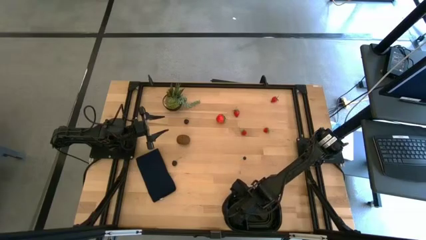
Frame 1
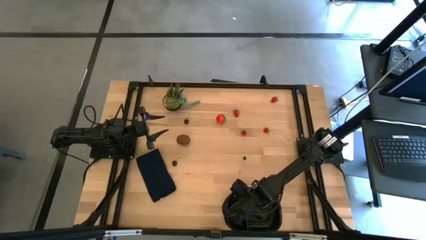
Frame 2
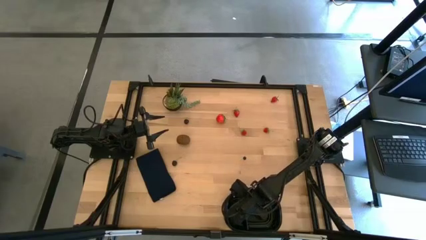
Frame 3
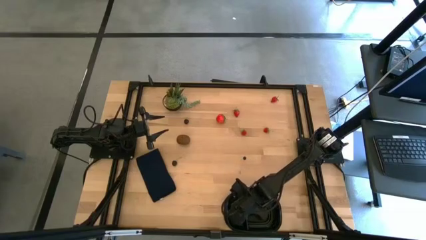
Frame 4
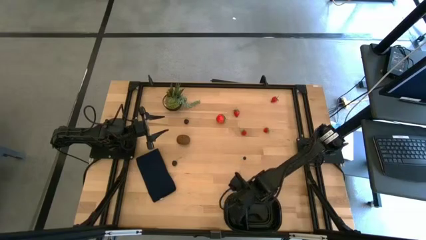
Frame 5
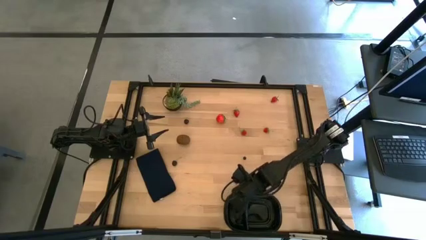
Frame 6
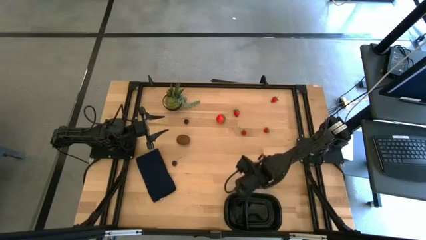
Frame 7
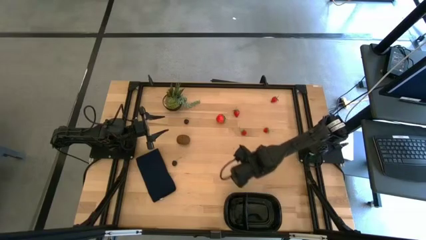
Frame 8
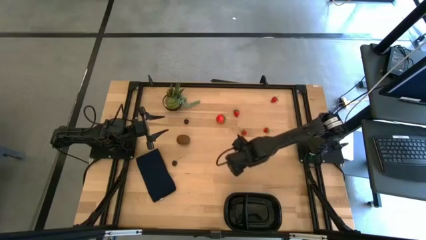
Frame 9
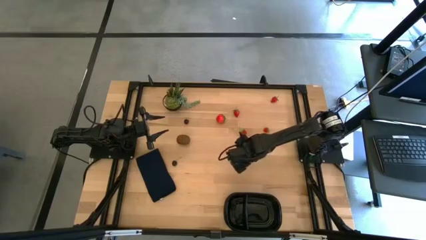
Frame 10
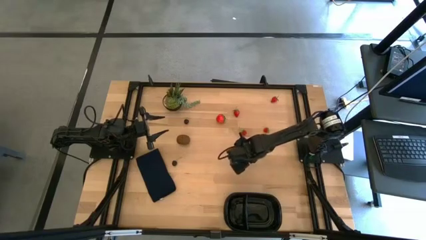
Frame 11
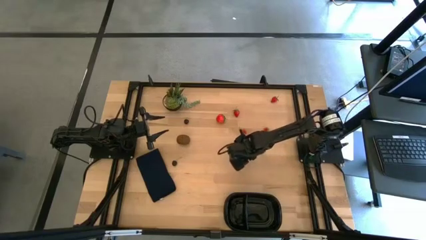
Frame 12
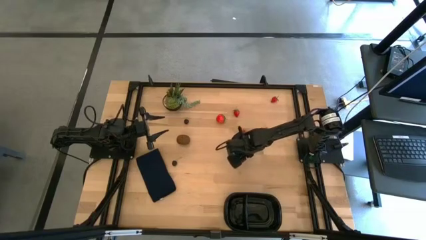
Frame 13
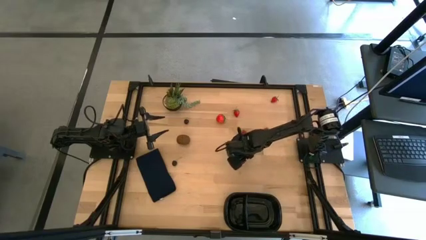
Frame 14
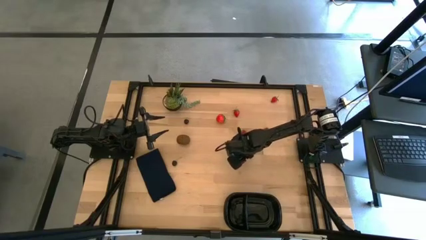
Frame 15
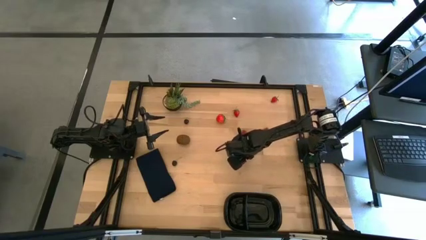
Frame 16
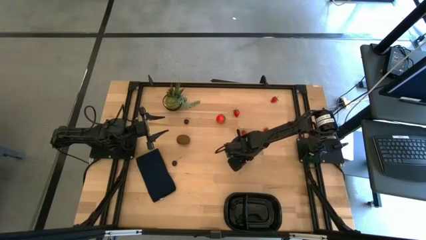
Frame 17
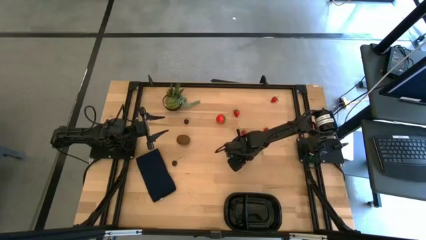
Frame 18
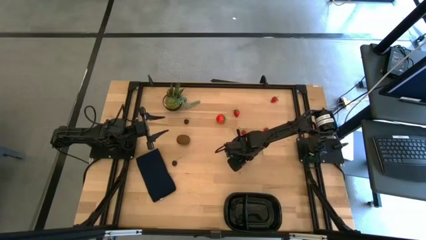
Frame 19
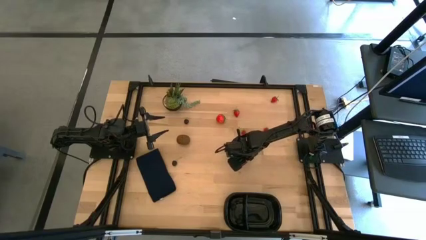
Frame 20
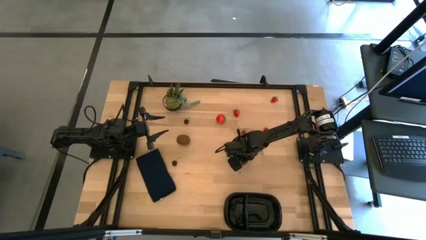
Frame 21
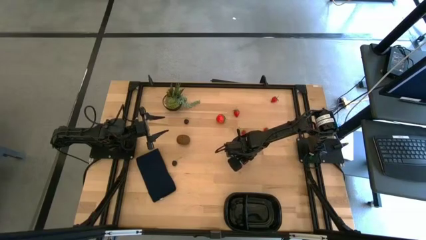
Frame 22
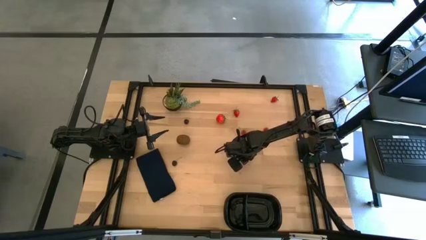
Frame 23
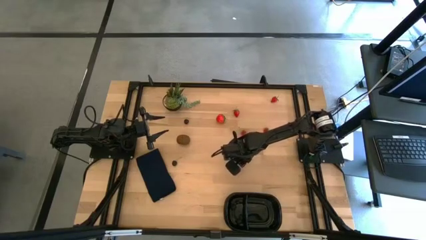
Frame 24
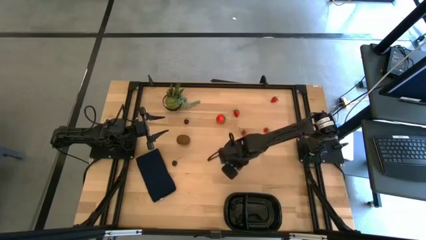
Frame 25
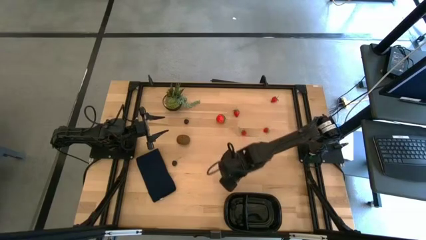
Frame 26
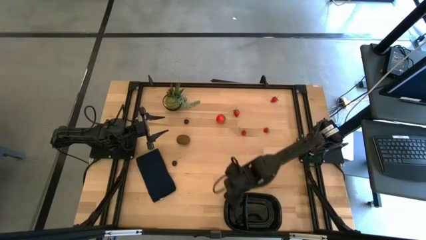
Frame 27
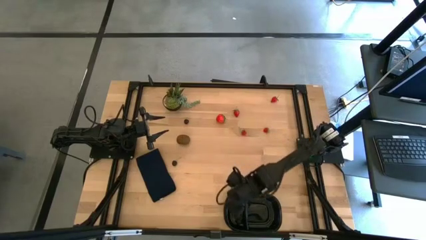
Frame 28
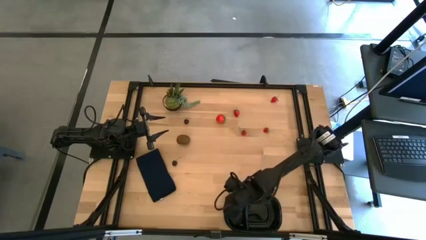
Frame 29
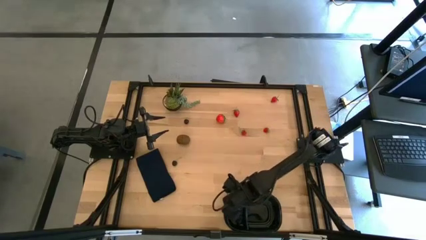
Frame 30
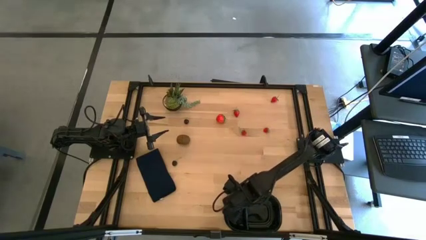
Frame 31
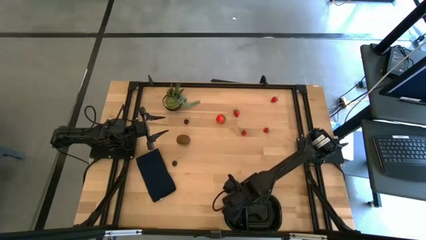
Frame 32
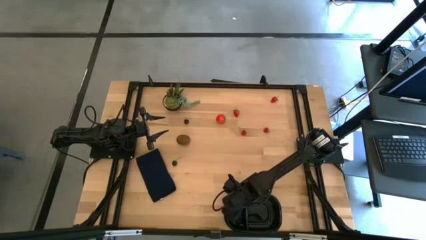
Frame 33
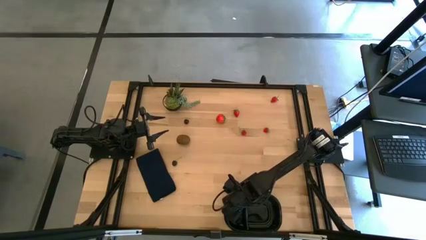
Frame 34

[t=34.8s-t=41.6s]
Task: Pick and placing Produce into tupperware
Put the blueberry into the black container

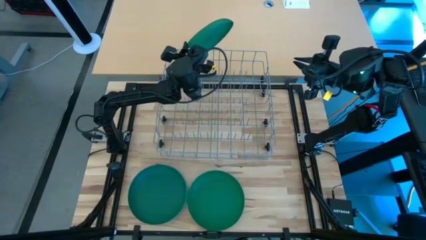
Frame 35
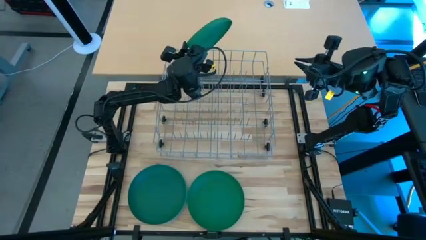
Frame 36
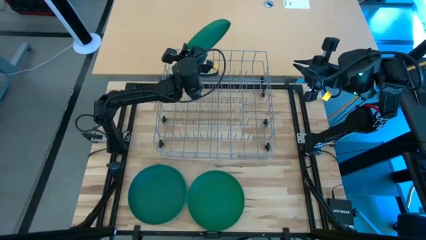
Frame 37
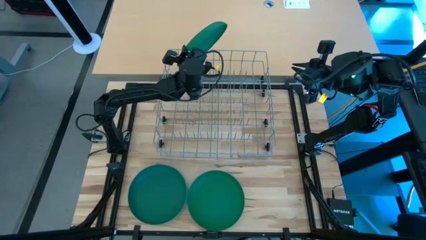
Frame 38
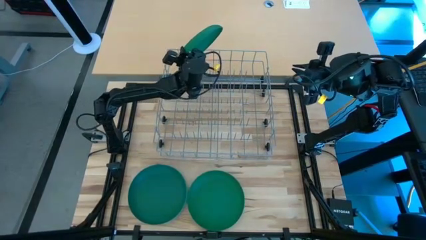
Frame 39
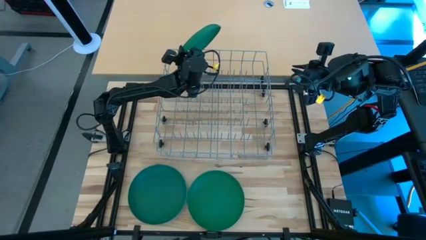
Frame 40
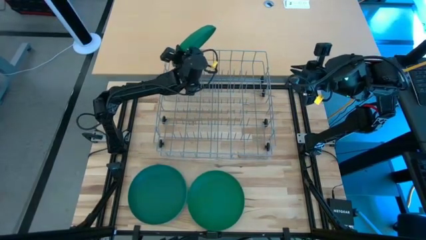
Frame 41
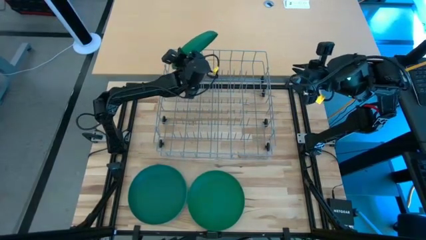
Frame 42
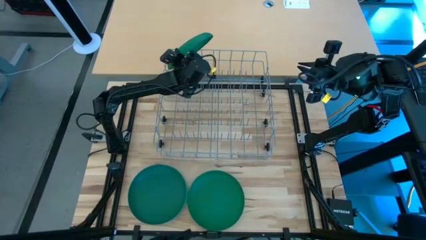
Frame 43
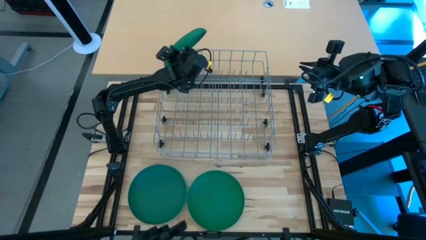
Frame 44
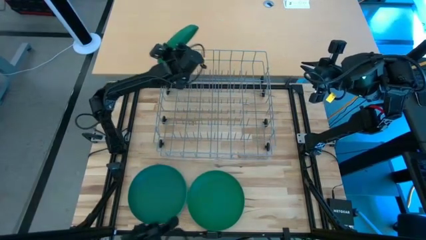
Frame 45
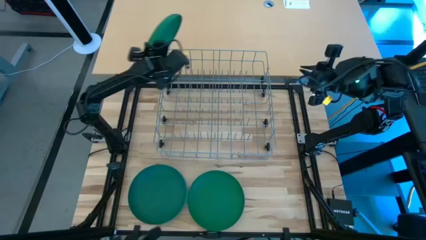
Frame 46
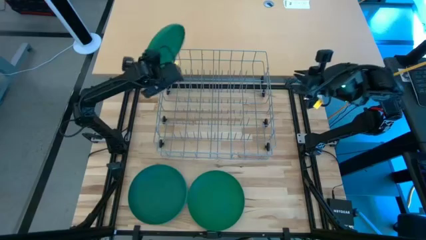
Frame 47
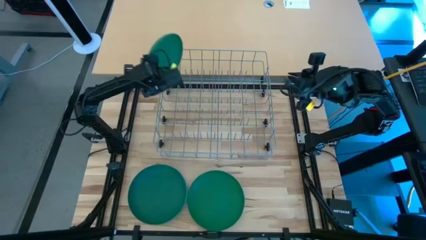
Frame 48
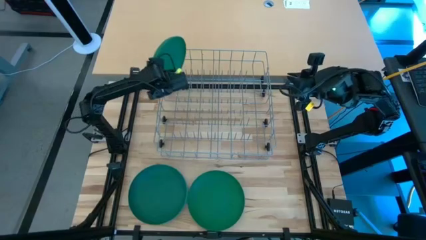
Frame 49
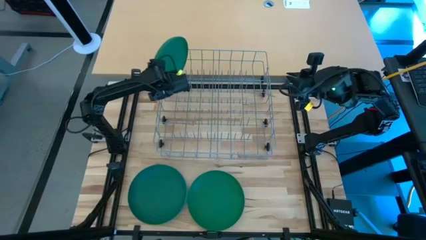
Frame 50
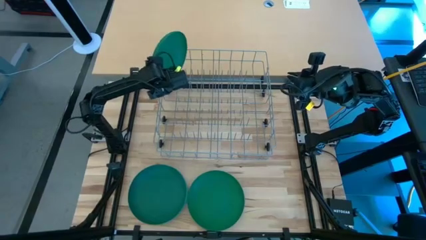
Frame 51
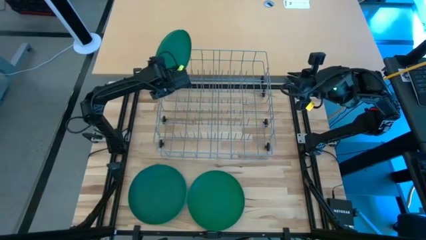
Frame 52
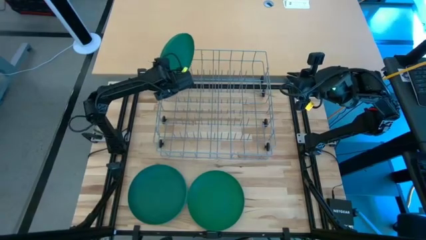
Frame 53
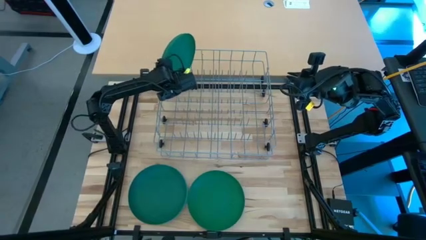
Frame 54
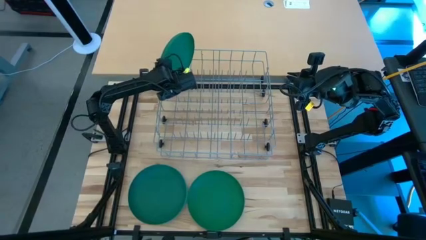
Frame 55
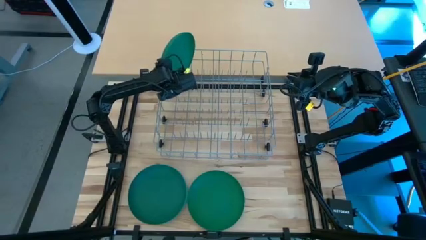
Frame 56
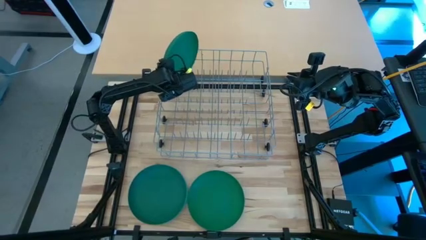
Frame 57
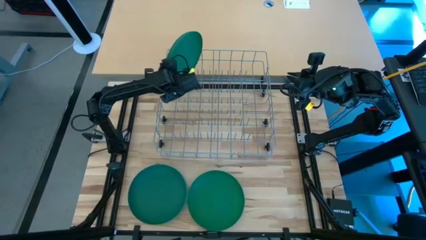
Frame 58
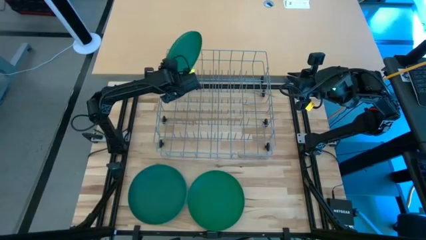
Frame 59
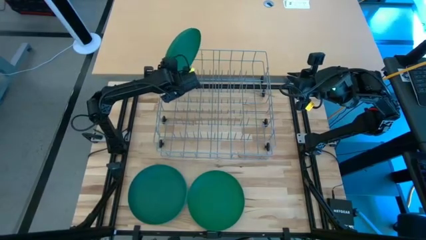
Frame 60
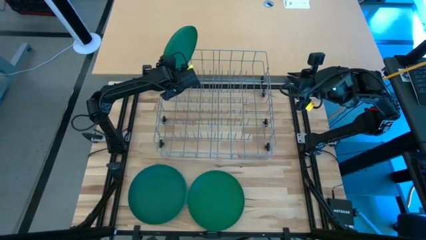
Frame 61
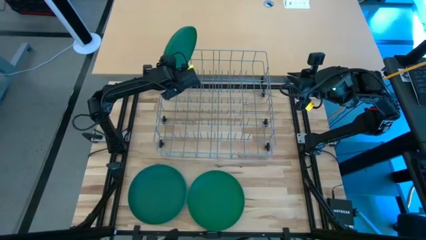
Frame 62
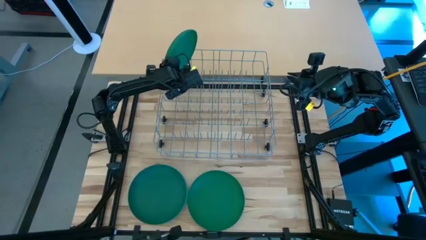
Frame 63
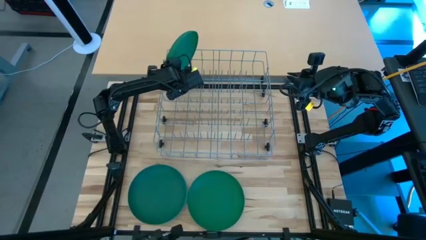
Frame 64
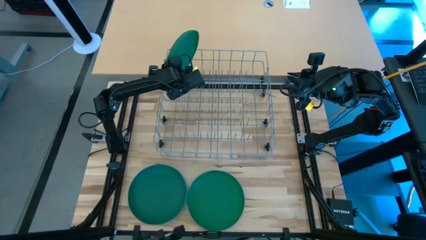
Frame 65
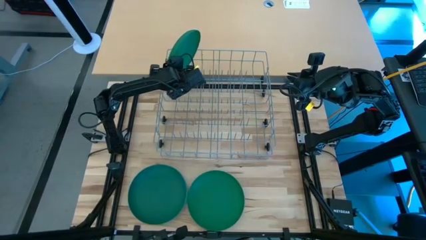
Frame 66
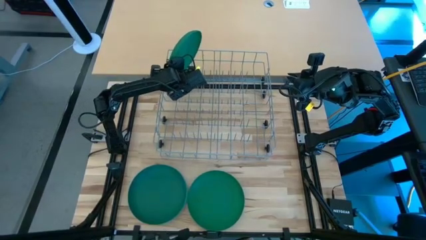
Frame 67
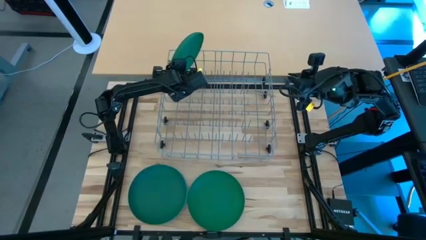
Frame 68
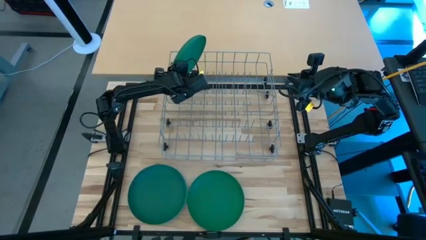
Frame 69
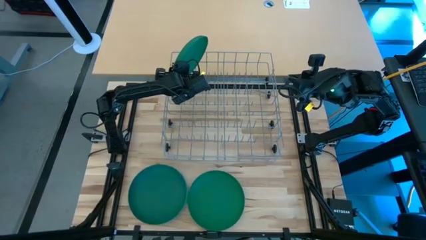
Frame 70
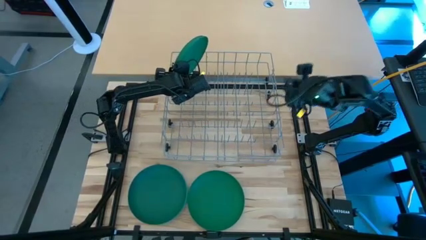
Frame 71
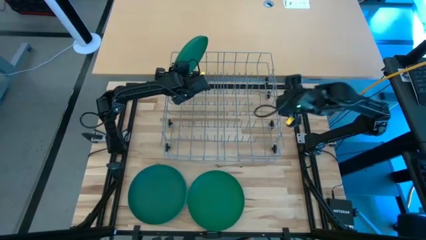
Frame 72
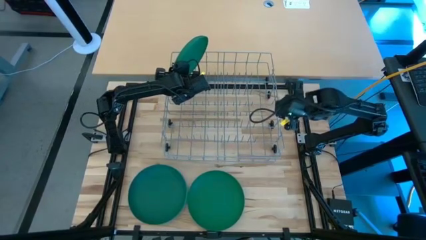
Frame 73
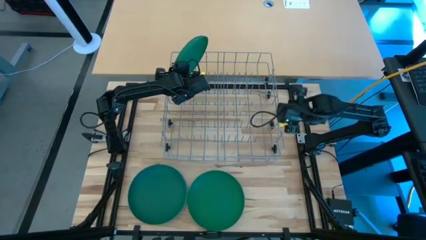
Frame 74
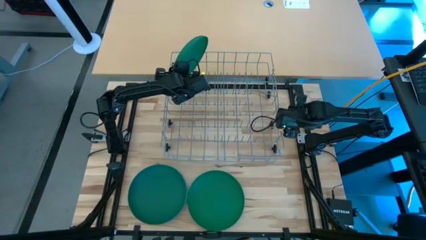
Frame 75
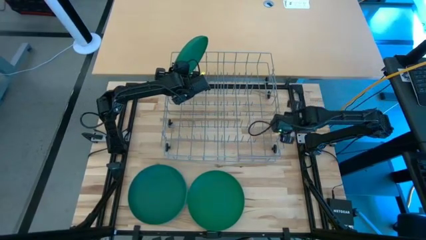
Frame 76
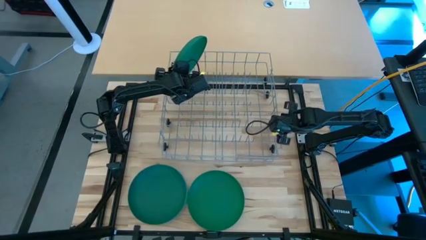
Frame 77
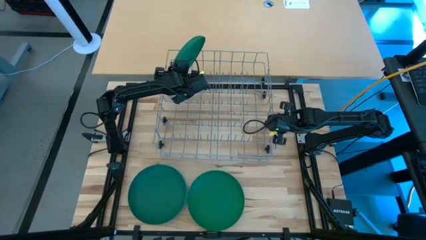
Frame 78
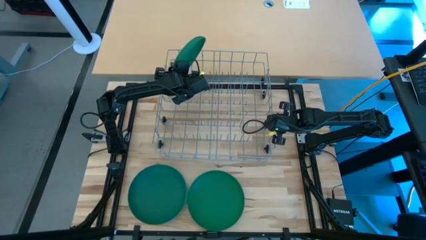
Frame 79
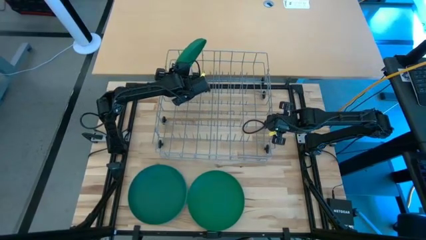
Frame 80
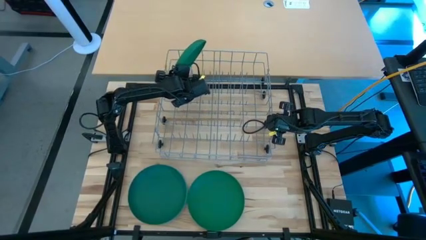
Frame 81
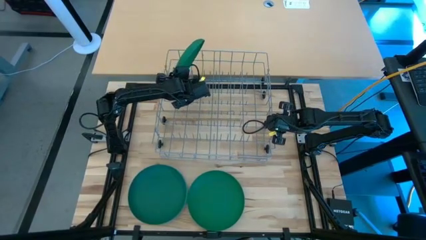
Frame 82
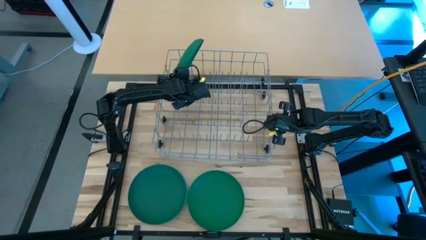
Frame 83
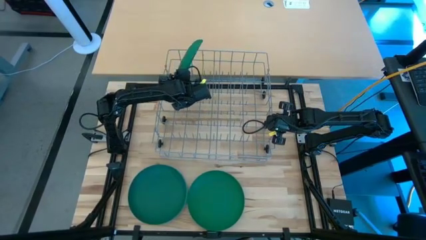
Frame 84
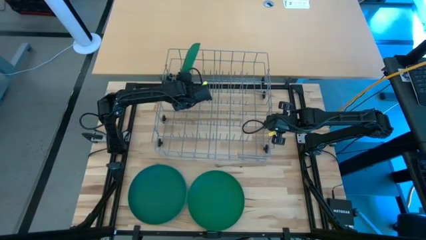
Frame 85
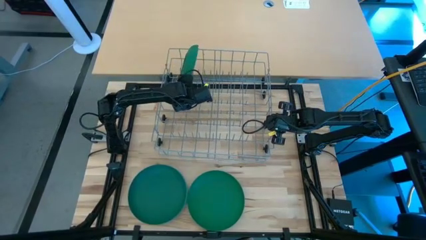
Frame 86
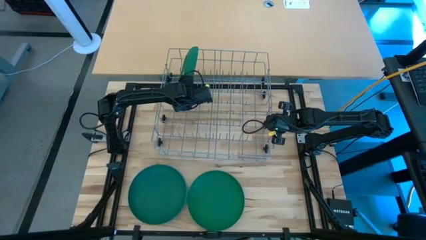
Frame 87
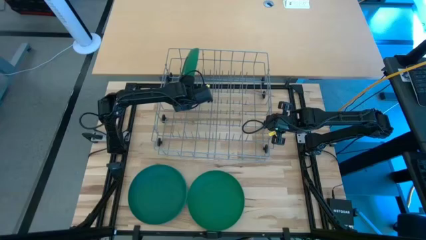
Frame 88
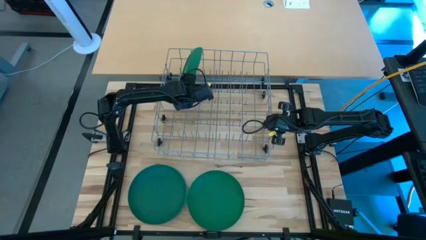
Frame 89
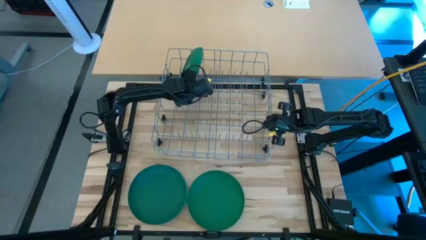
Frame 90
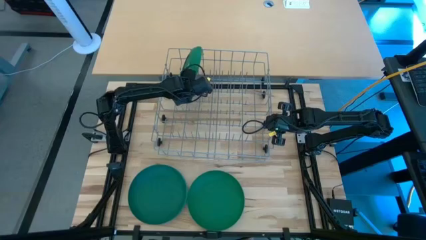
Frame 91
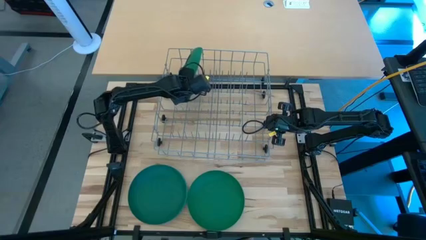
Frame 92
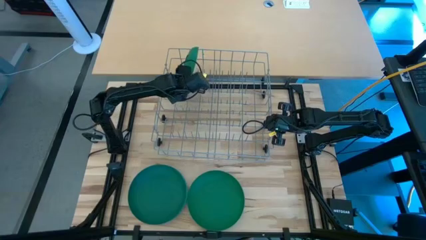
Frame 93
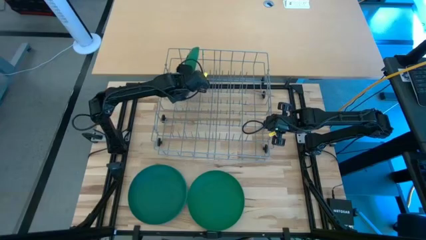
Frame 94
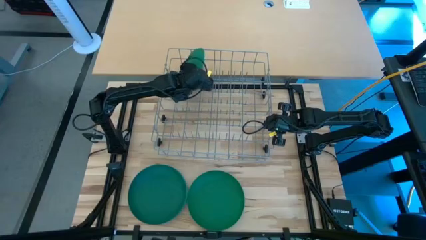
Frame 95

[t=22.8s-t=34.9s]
Task: Sort dishes
Put the right green plate in the dish rack
